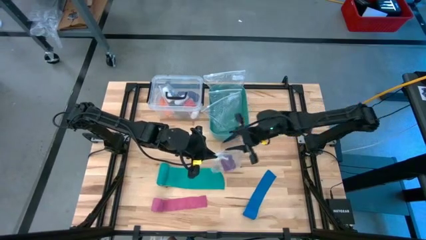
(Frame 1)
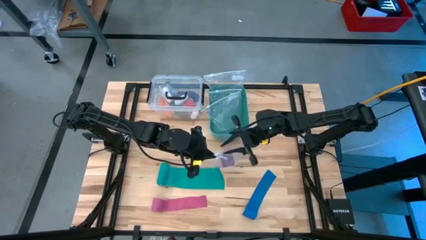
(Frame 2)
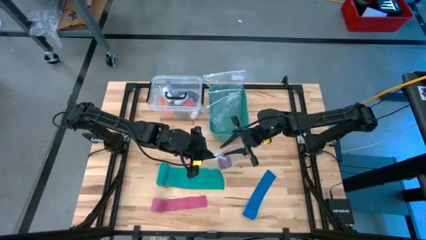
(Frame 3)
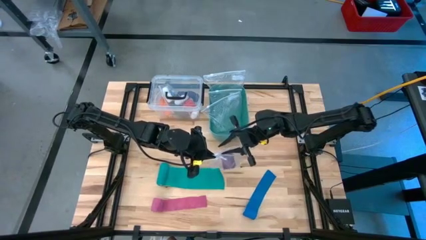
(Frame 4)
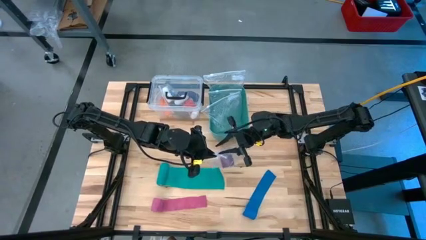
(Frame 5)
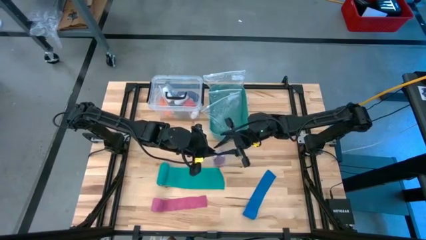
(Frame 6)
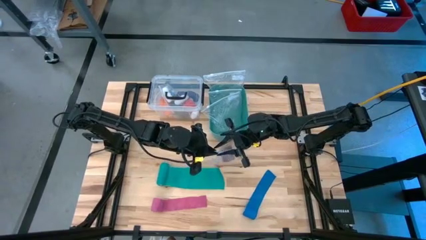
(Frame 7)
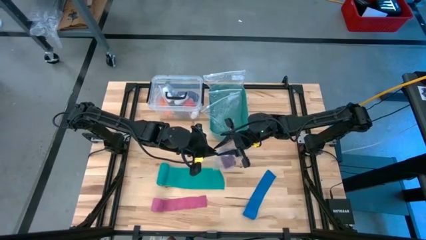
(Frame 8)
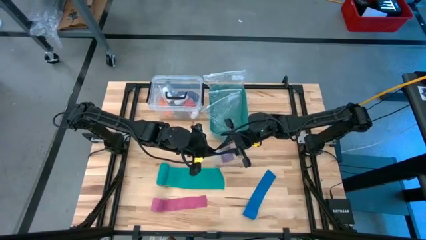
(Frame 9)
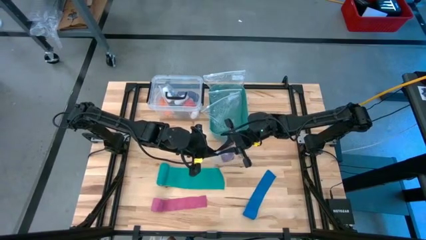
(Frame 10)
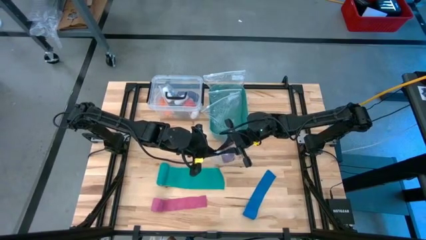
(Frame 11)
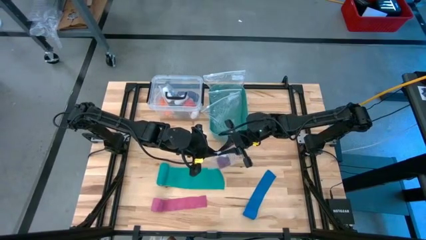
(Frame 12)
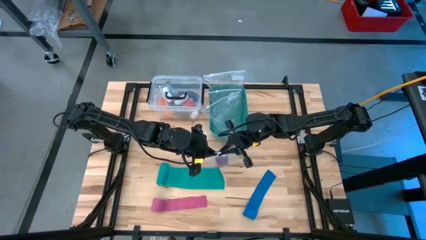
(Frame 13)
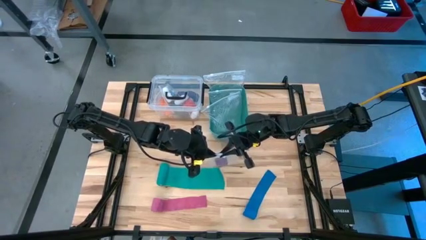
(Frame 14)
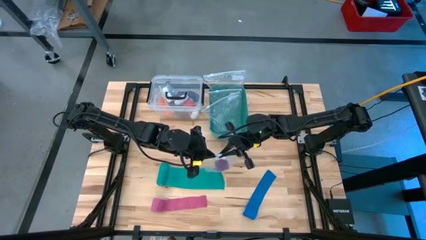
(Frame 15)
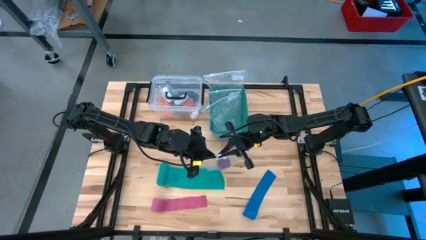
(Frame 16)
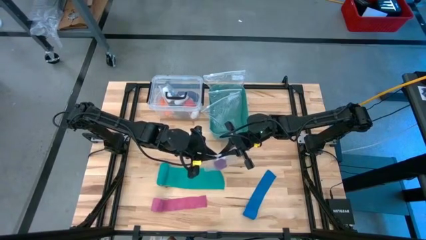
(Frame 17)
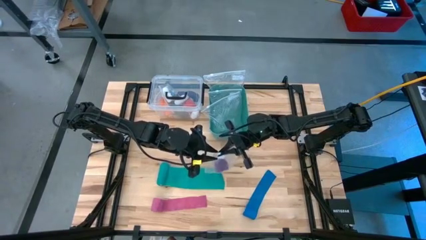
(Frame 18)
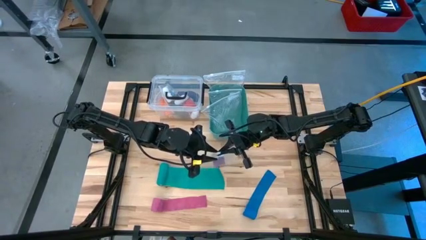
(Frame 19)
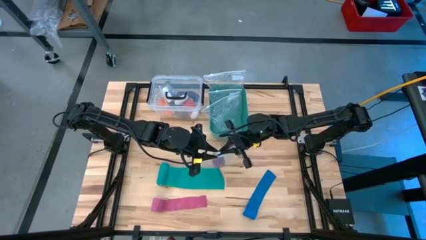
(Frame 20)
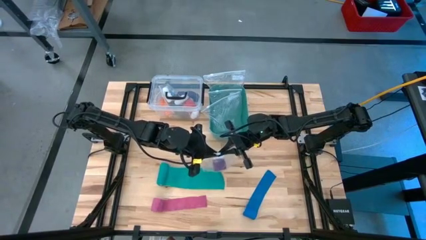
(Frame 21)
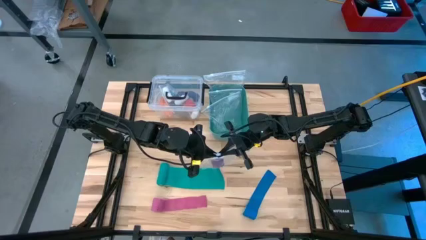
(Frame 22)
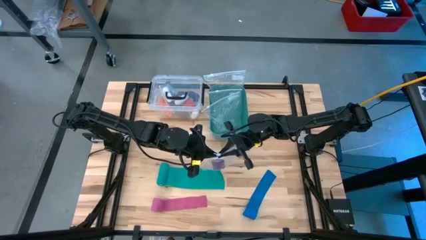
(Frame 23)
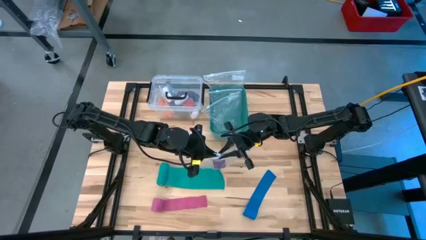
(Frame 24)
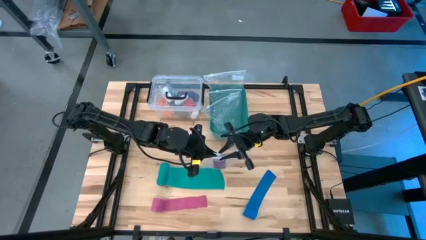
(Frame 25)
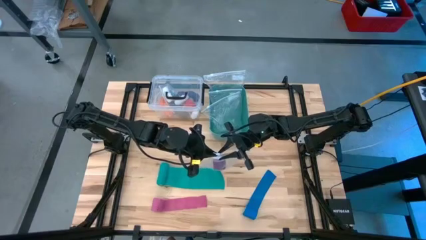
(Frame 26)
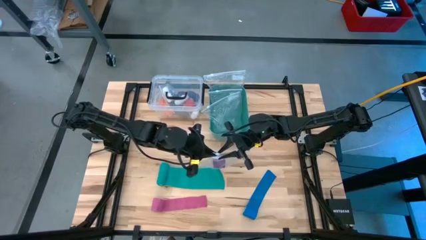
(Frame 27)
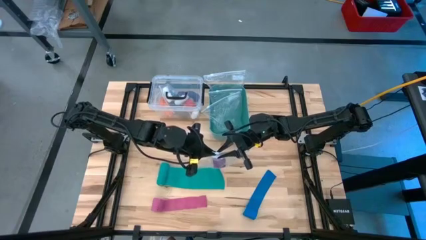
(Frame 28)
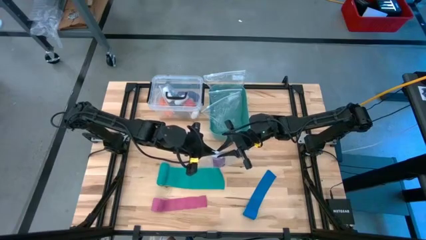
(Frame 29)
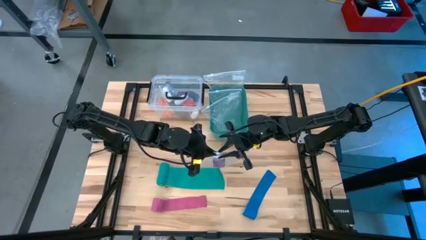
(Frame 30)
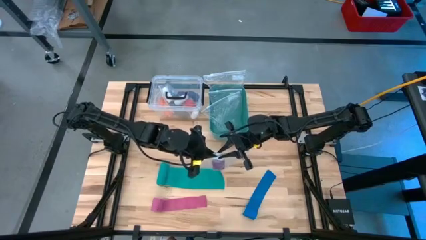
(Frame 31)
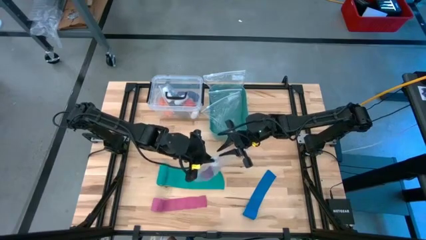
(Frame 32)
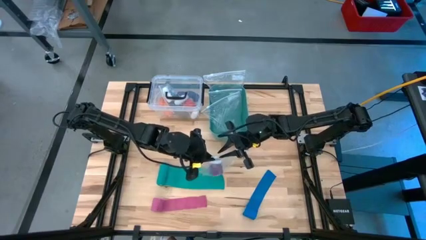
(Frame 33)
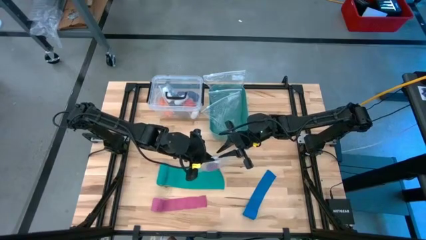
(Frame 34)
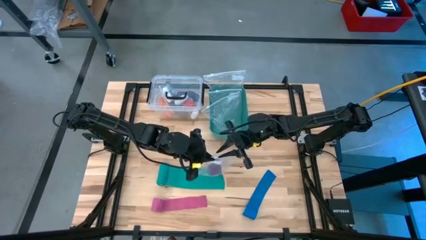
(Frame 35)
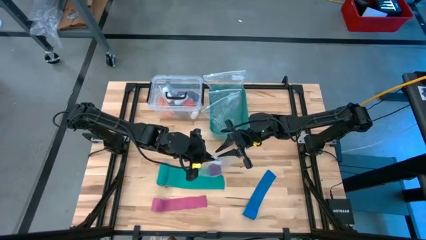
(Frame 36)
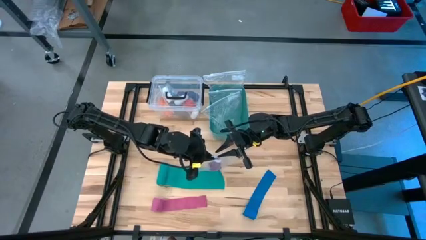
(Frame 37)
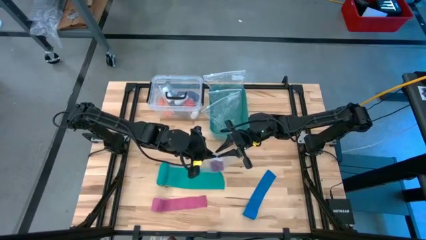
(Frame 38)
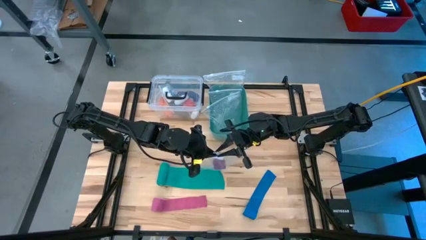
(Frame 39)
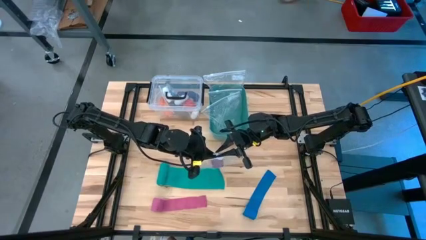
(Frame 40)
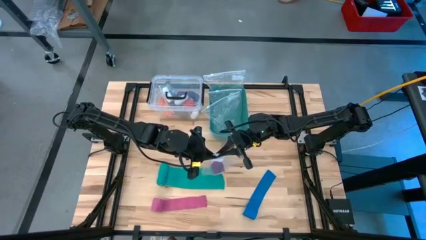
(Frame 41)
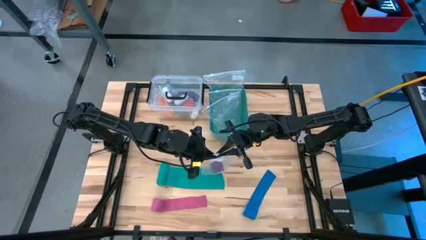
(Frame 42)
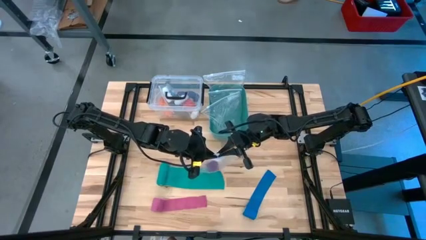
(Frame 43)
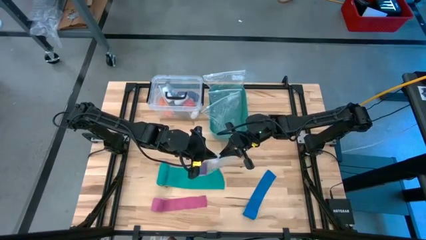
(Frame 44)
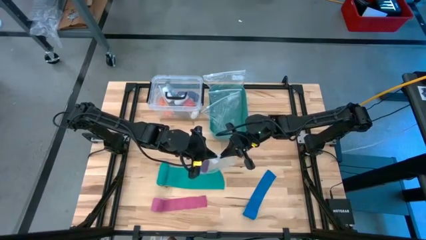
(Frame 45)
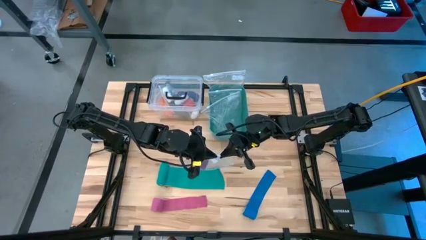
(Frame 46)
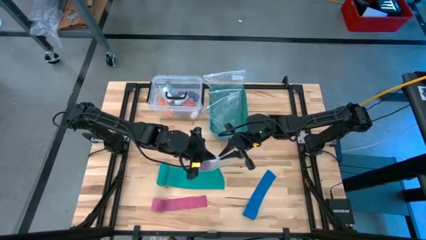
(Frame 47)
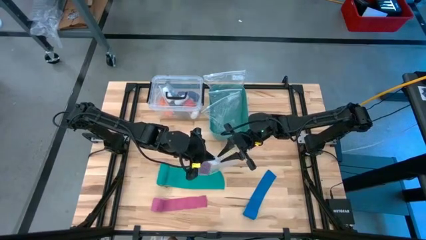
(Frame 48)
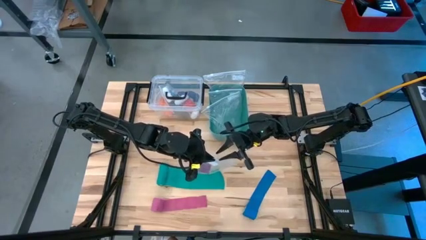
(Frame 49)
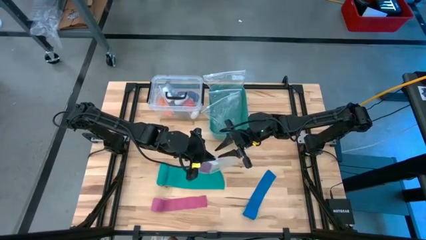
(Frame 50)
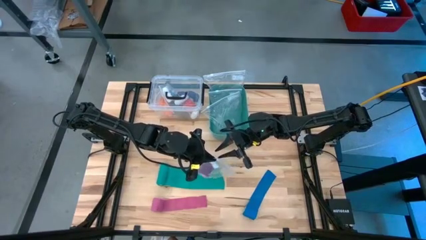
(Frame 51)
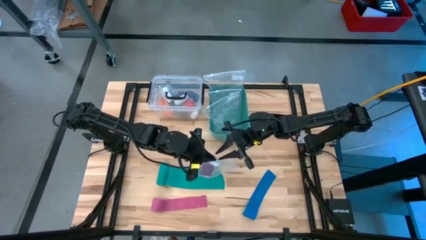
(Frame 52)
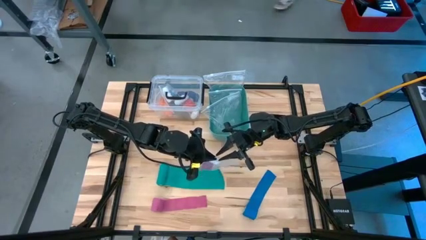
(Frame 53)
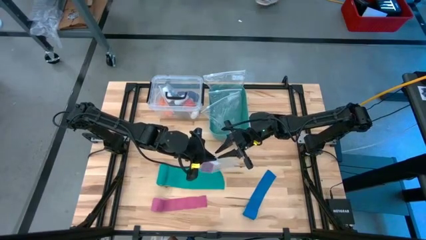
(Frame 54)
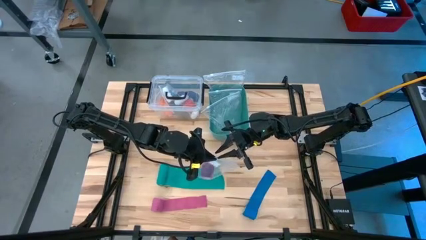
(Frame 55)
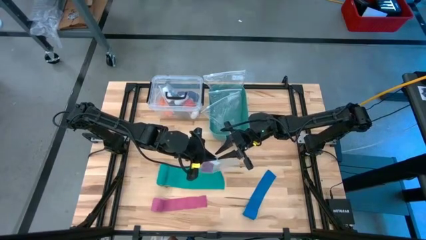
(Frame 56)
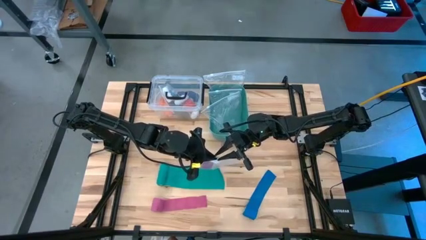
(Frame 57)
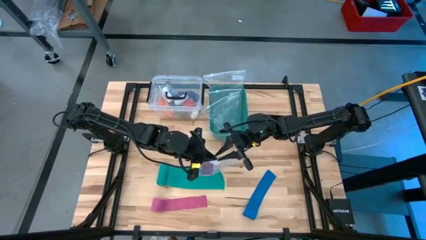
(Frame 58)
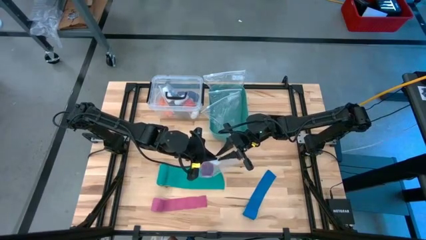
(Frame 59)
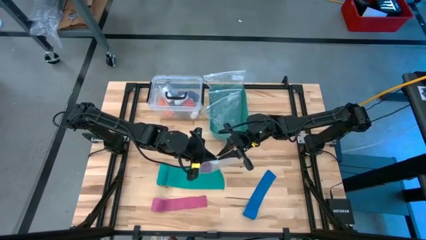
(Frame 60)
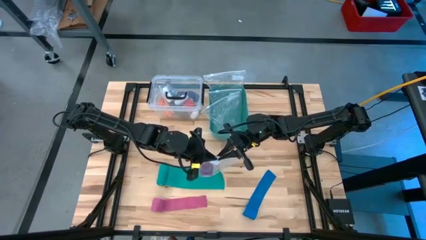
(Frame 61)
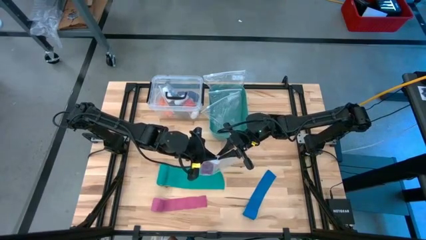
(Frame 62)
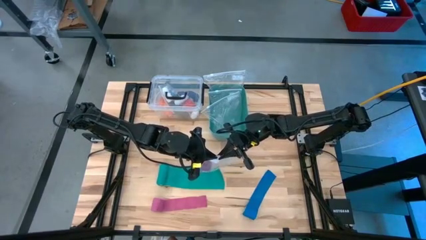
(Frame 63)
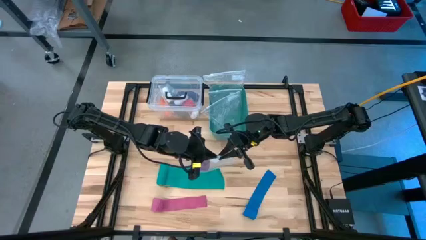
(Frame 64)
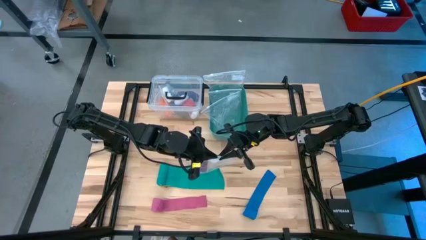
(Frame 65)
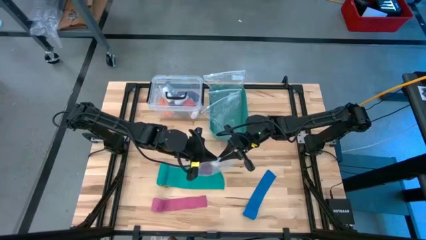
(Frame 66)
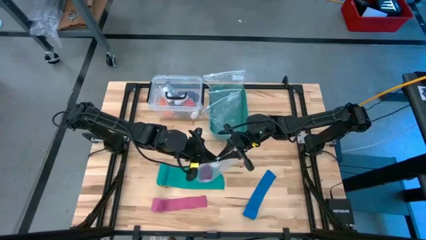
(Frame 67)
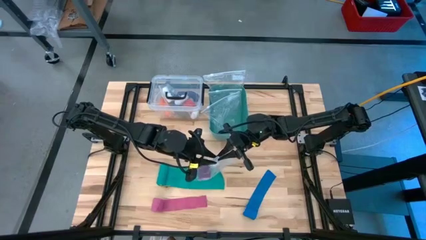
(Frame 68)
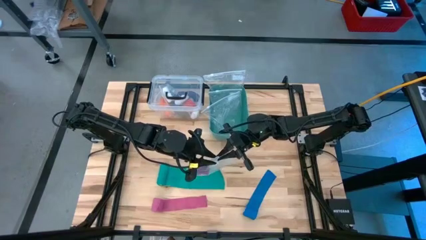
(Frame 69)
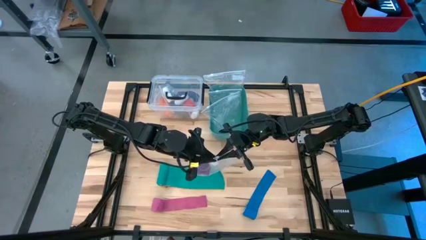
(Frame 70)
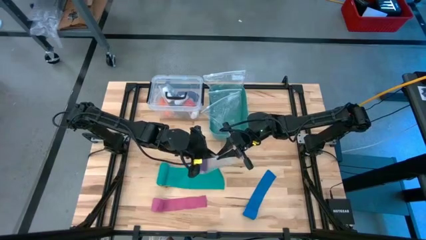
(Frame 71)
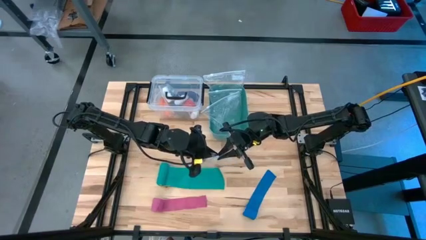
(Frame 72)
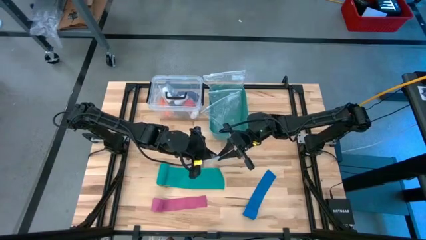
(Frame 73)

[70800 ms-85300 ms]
Task: Roll bandage
Close the transparent zip bag

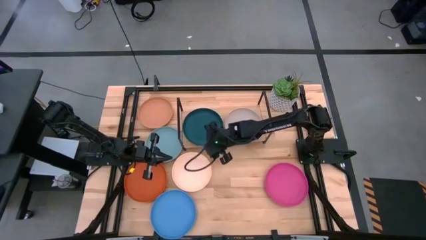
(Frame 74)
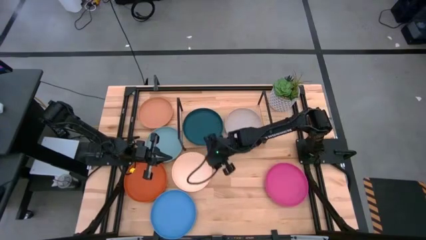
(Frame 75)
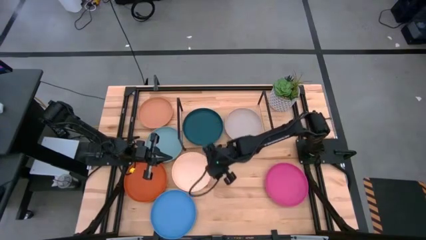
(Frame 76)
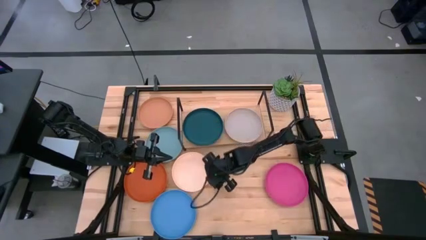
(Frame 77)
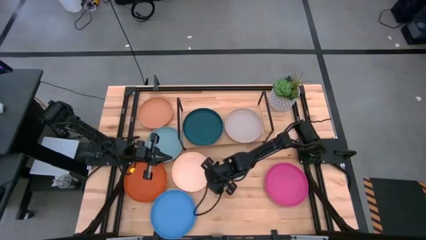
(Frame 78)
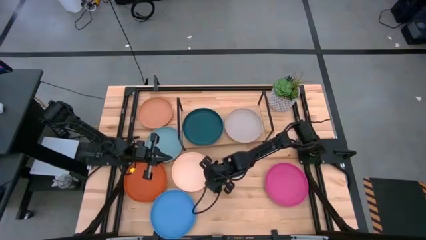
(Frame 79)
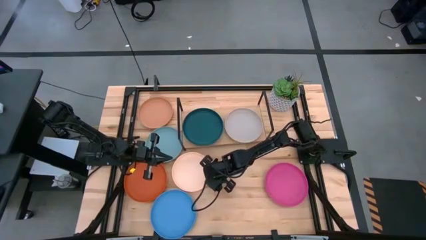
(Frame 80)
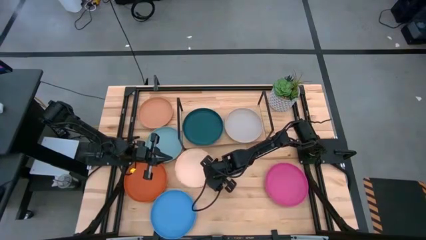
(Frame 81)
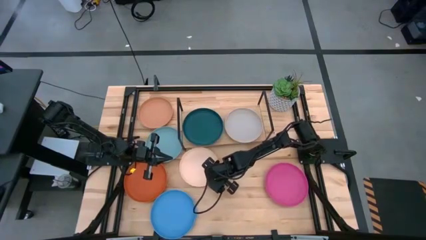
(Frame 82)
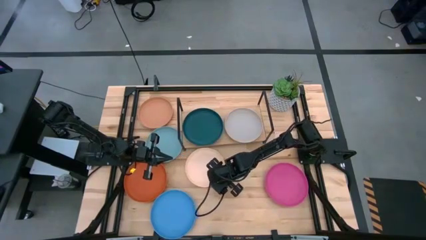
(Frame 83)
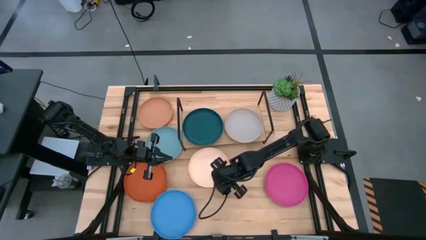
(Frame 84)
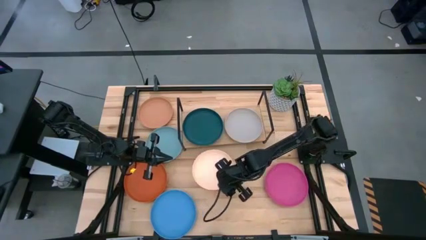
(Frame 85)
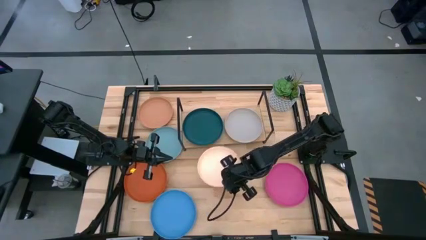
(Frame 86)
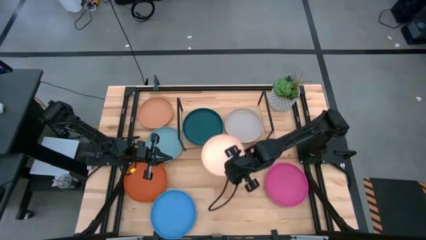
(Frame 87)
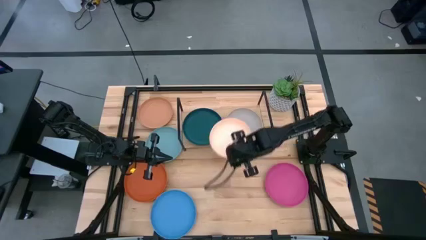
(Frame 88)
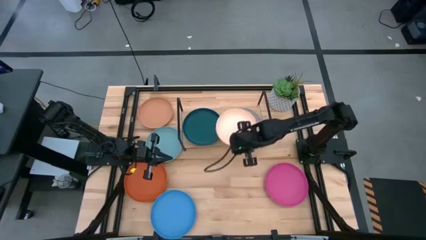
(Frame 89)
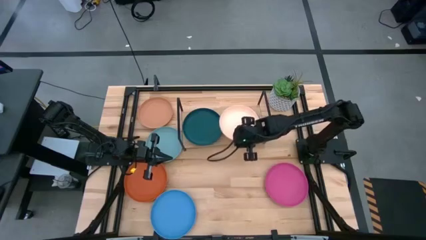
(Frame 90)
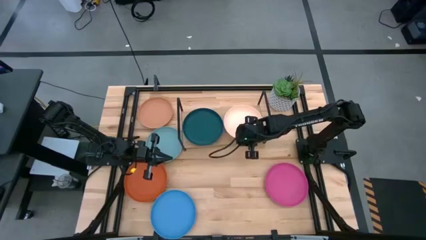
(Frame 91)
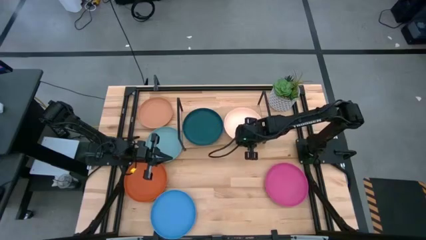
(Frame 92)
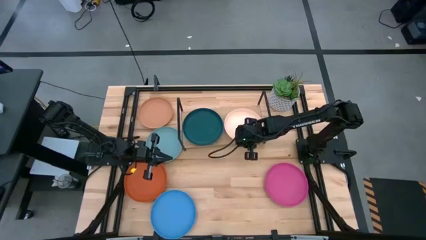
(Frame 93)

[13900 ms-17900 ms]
Task: Place and stack plates onto a shelf
Stack the peach plate on top of the gray plate on the shelf
